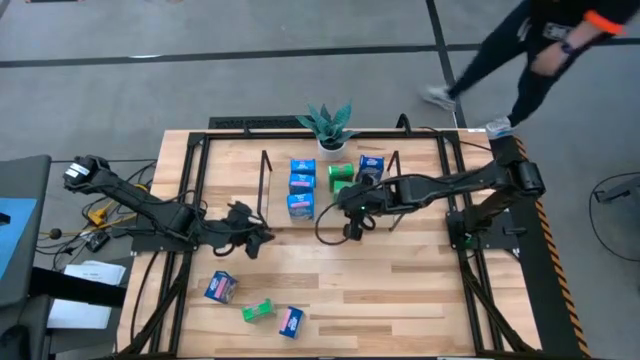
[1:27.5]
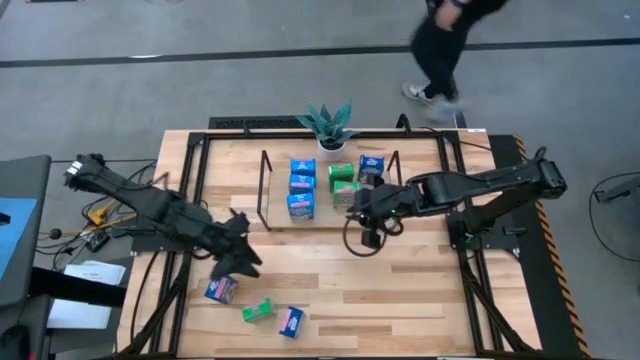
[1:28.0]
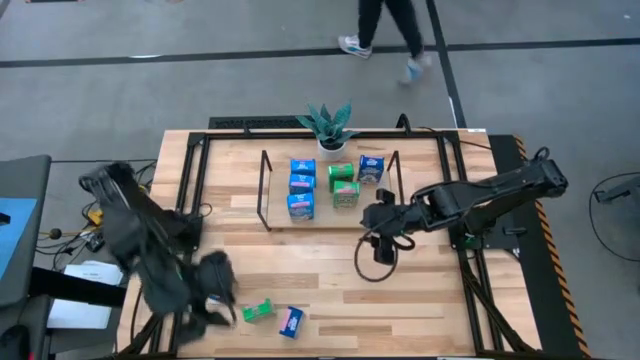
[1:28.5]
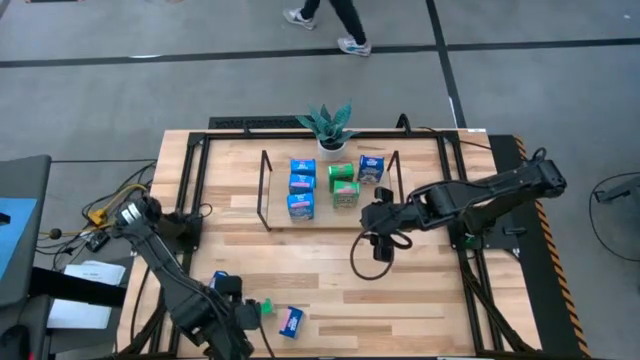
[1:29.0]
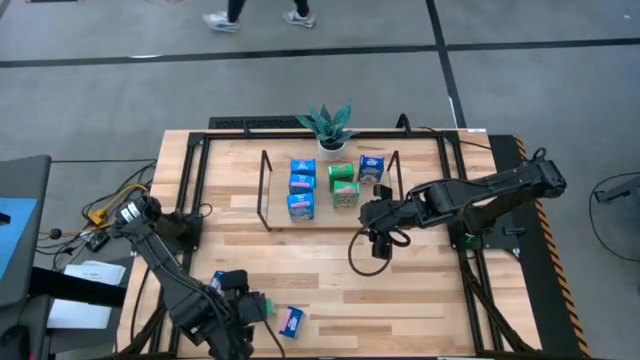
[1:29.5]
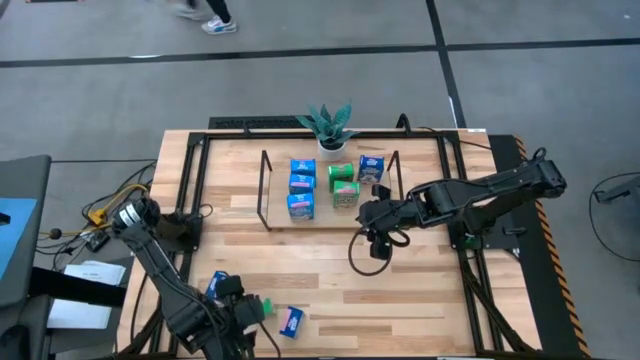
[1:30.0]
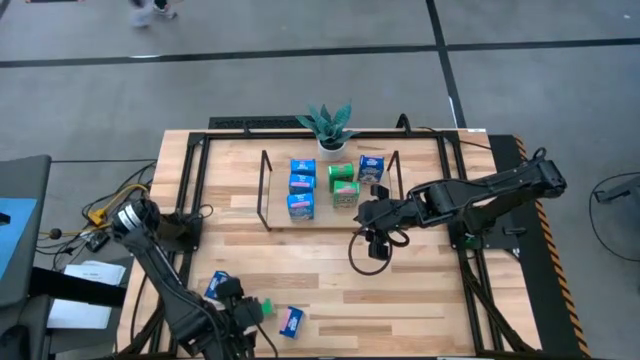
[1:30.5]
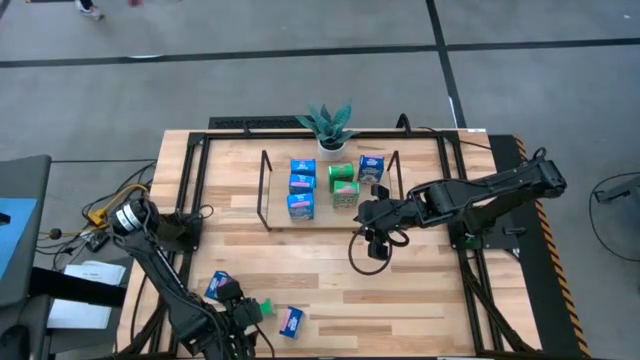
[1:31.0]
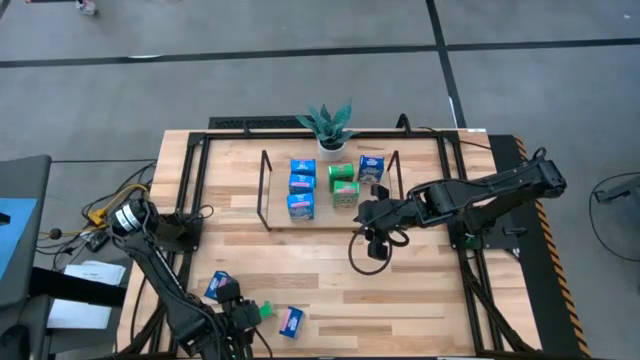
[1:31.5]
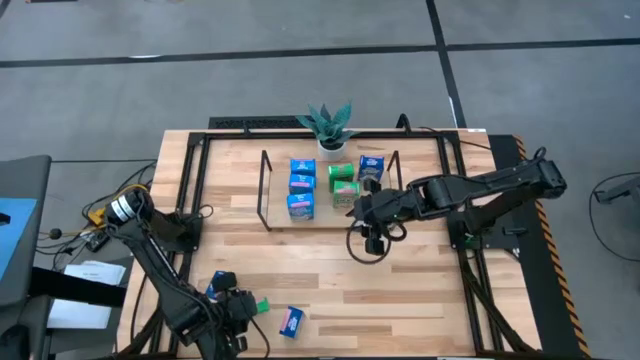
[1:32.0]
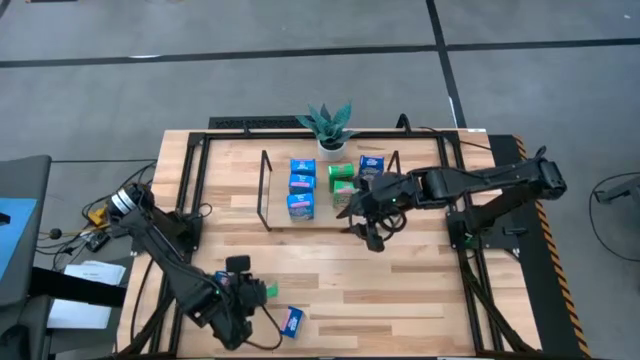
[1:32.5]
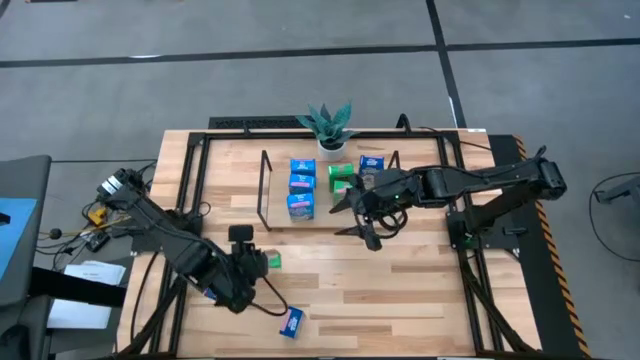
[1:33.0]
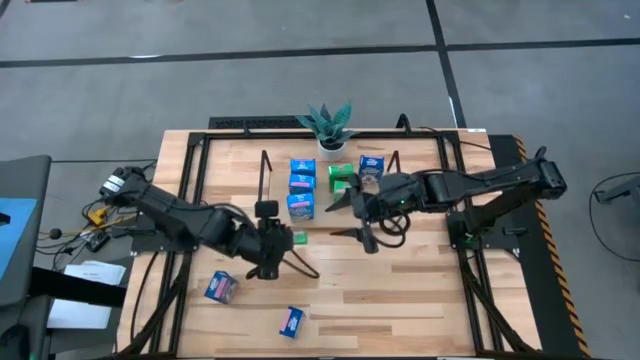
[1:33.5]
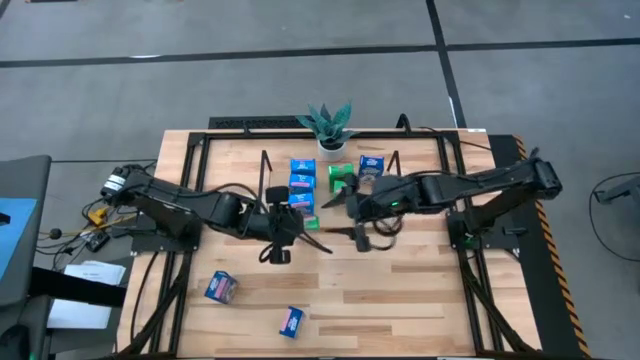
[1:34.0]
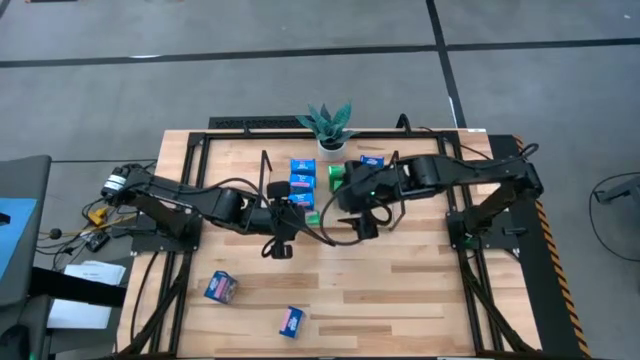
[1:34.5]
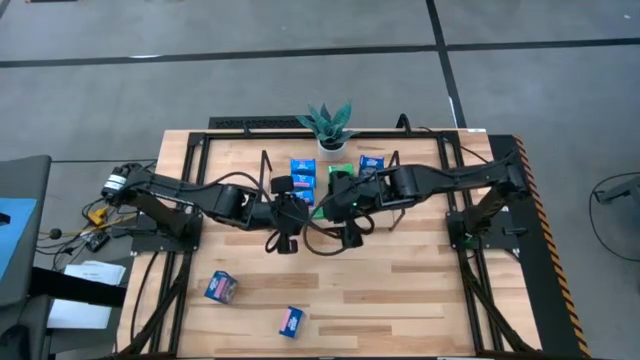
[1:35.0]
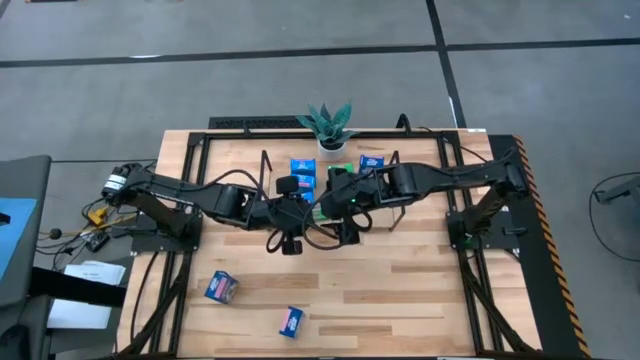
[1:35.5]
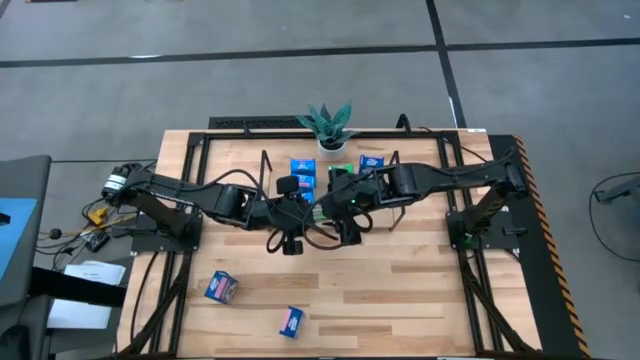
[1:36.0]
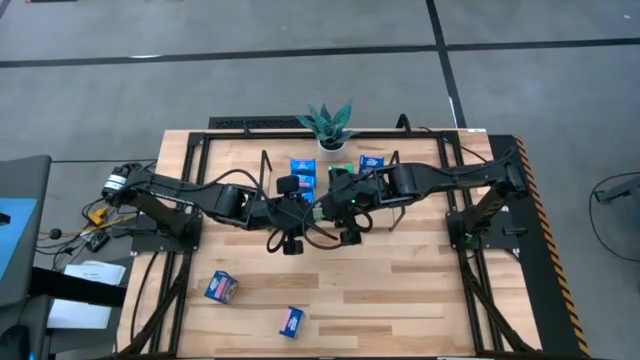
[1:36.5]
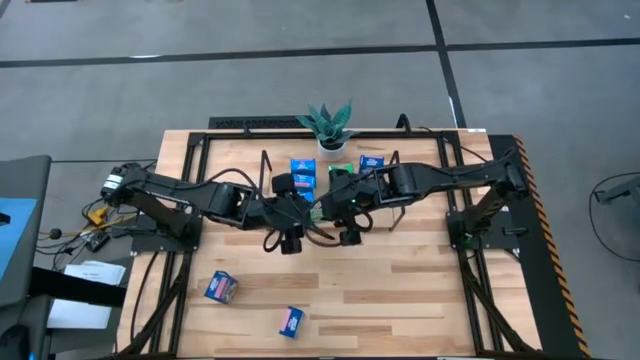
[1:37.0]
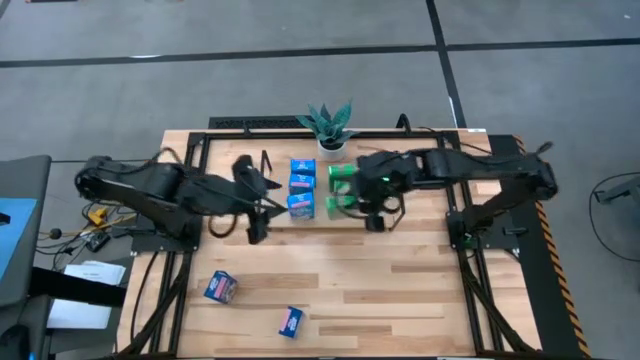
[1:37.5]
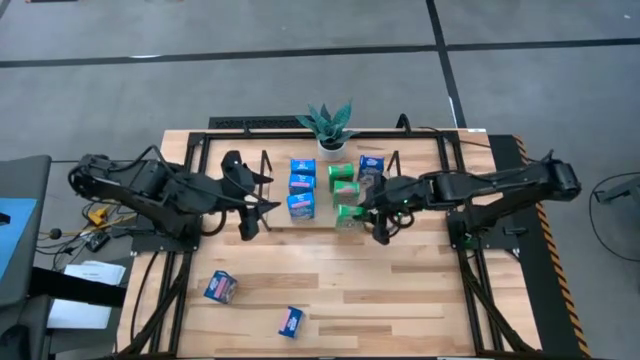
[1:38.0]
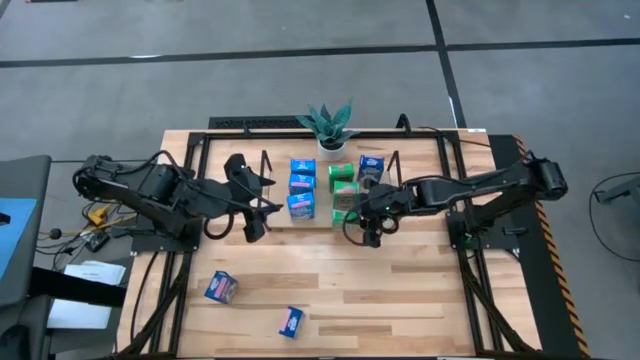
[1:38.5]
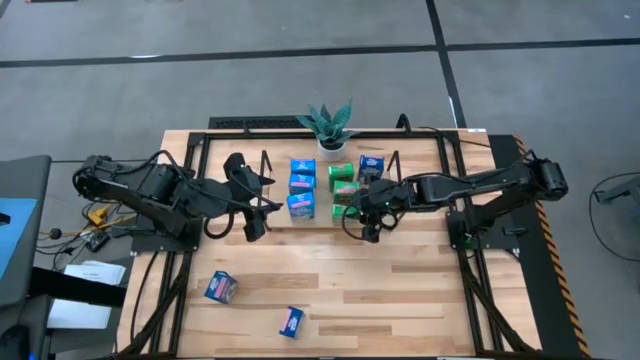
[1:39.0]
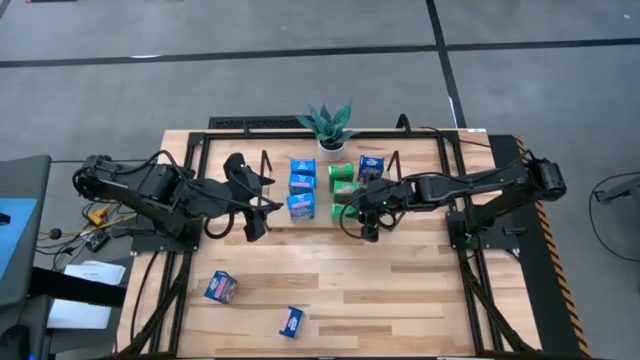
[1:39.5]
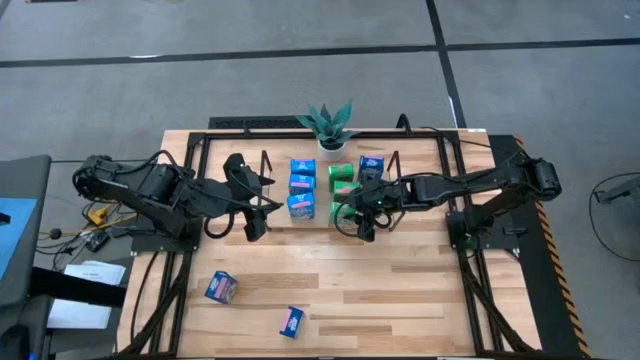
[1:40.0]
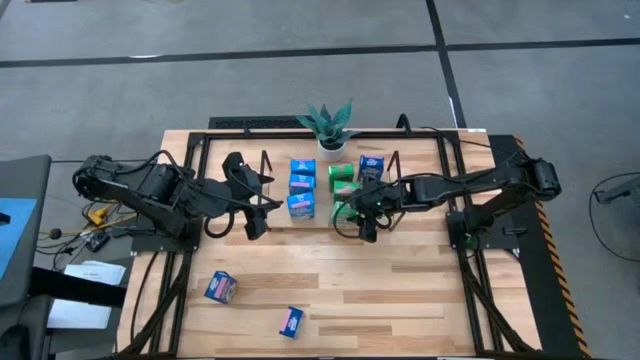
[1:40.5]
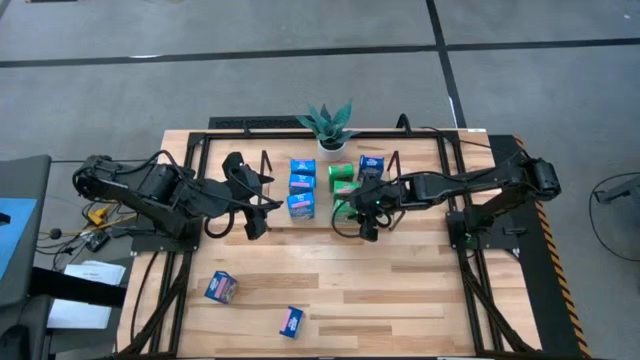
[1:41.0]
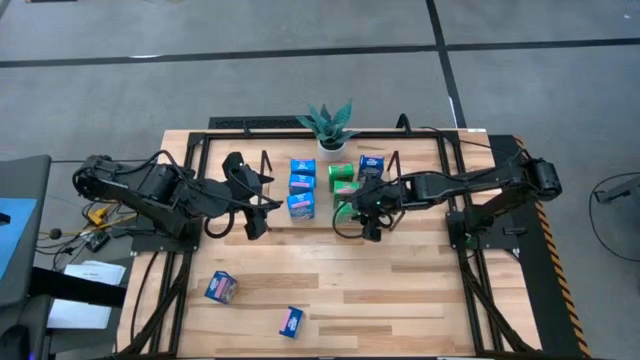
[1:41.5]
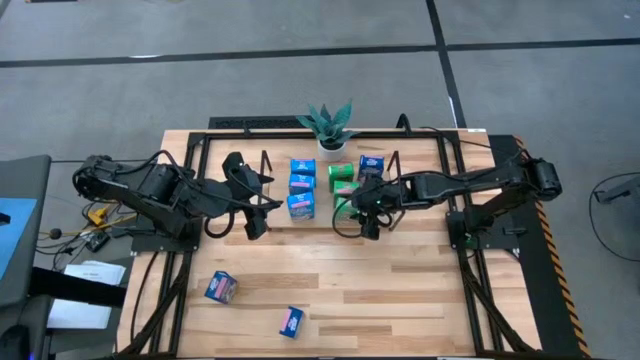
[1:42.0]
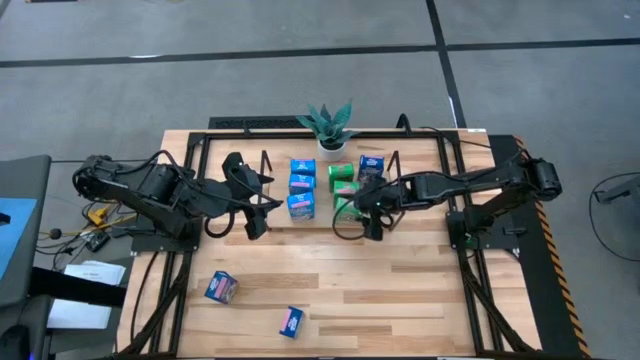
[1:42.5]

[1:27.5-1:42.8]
Task: Stack cereal on shelf
Put the green cereal box on the shelf aligned with the other green cereal boxes
